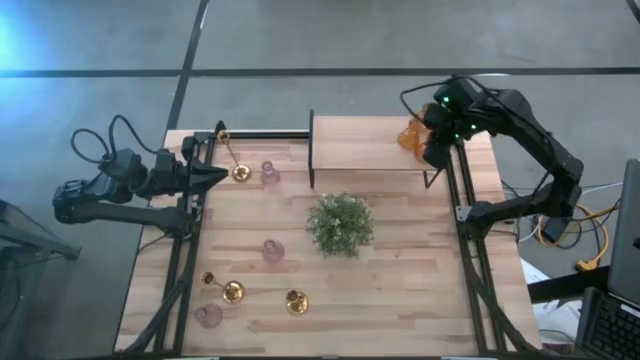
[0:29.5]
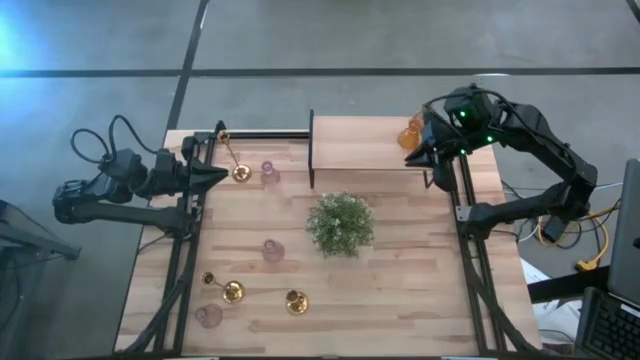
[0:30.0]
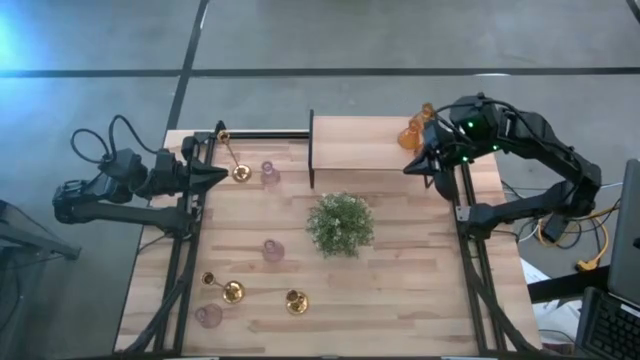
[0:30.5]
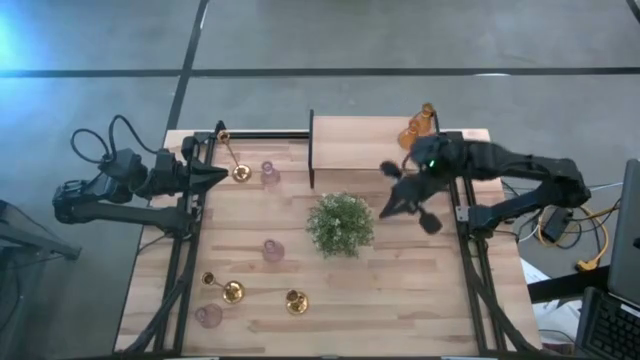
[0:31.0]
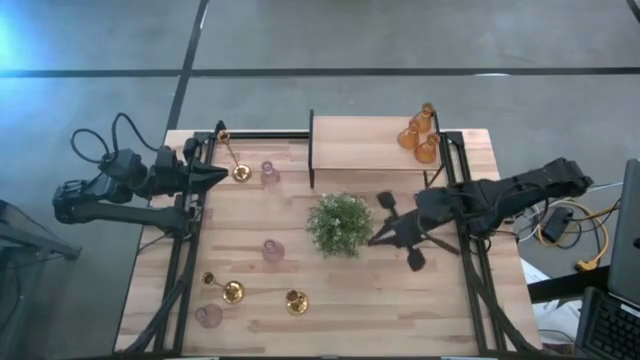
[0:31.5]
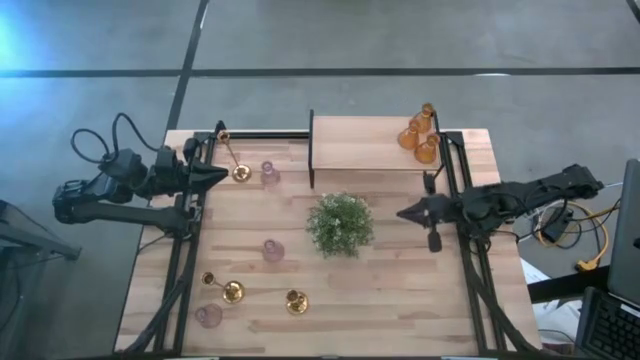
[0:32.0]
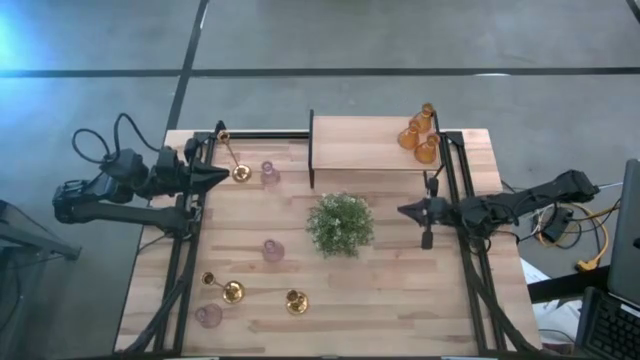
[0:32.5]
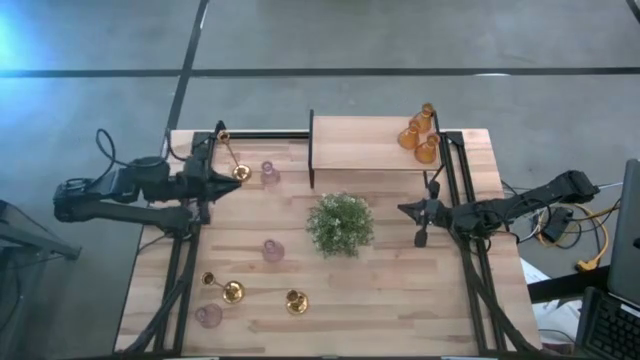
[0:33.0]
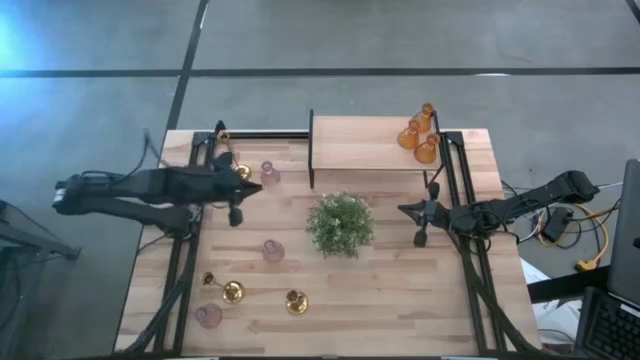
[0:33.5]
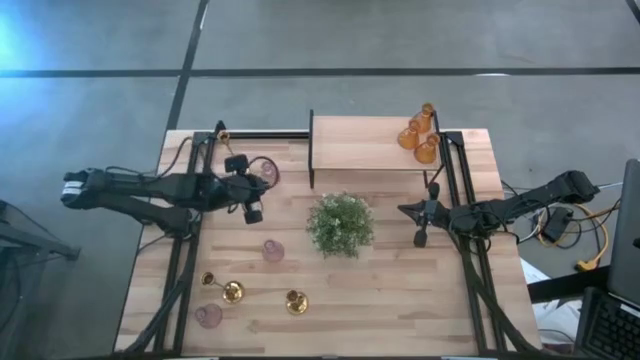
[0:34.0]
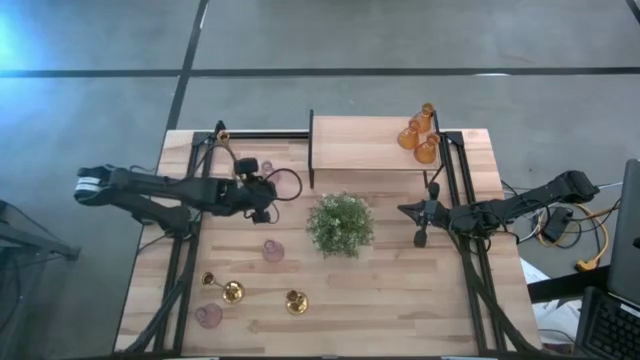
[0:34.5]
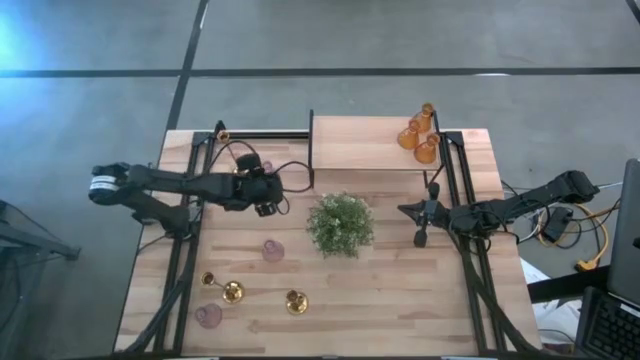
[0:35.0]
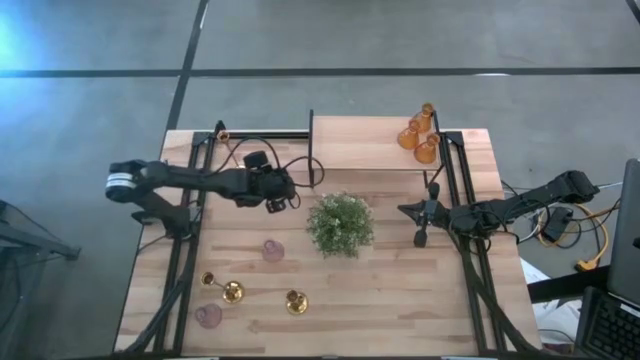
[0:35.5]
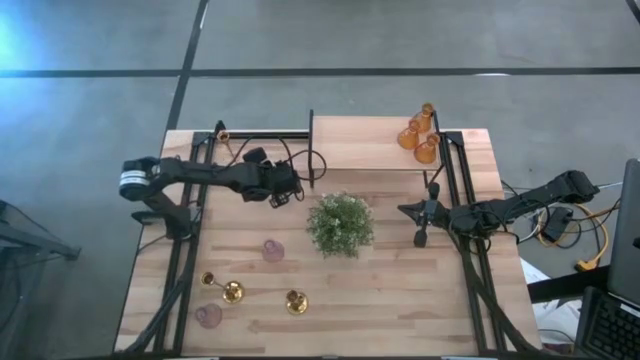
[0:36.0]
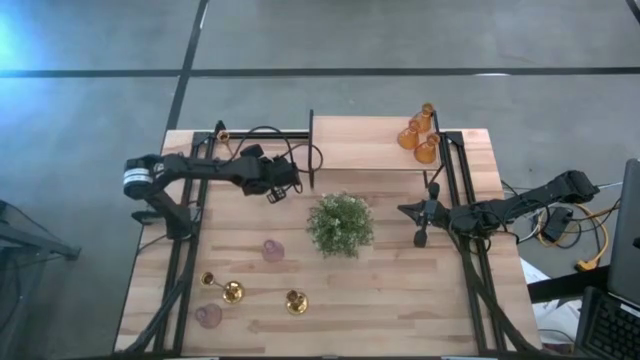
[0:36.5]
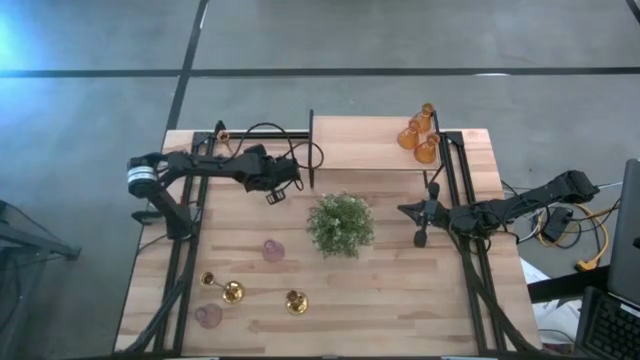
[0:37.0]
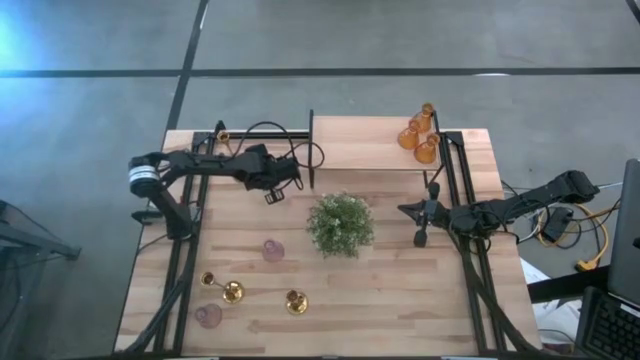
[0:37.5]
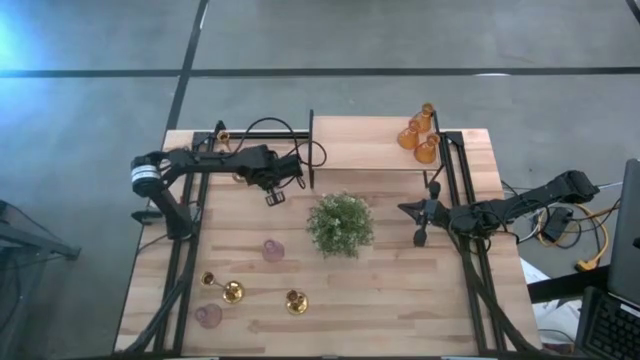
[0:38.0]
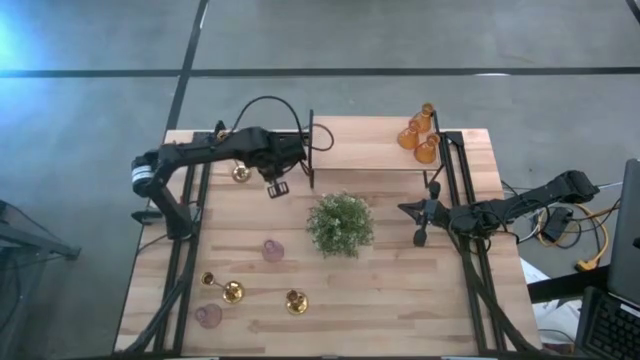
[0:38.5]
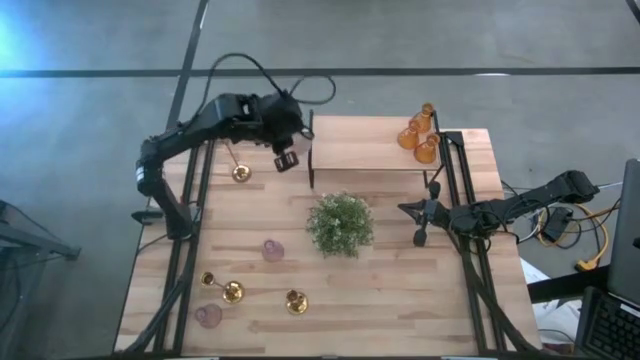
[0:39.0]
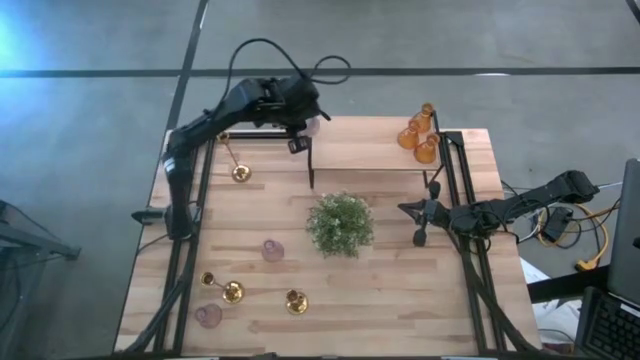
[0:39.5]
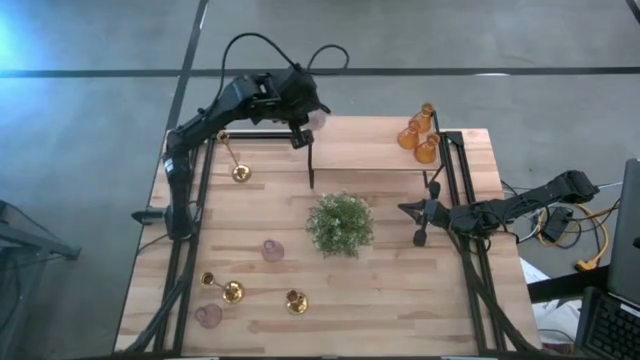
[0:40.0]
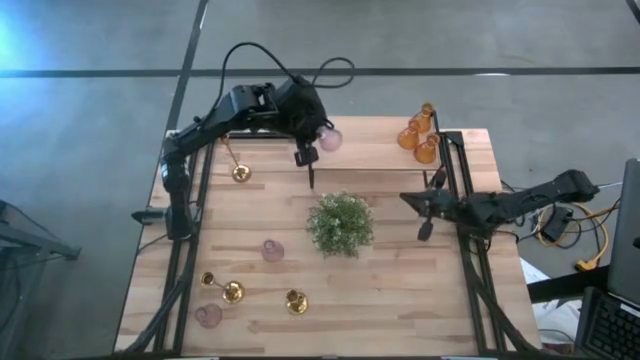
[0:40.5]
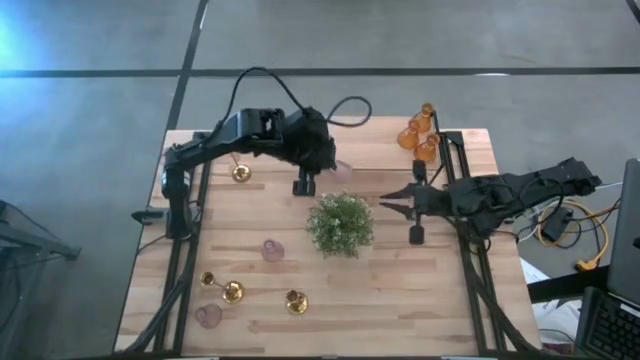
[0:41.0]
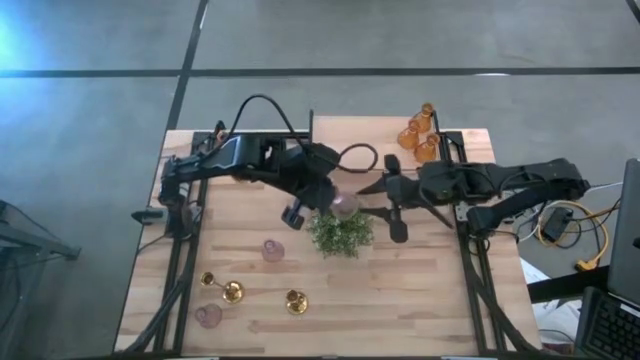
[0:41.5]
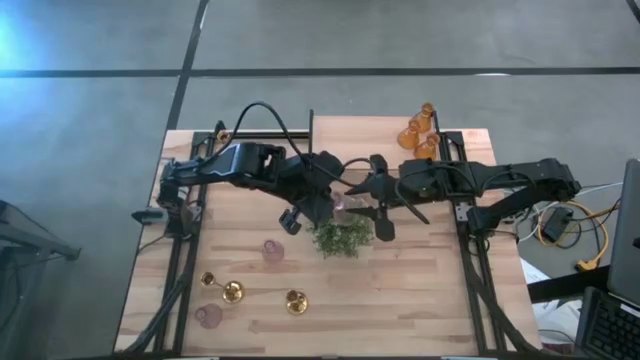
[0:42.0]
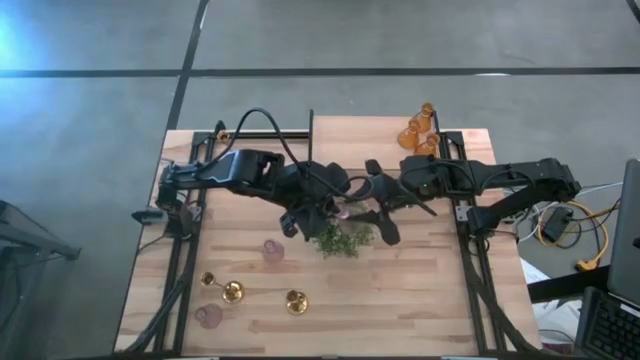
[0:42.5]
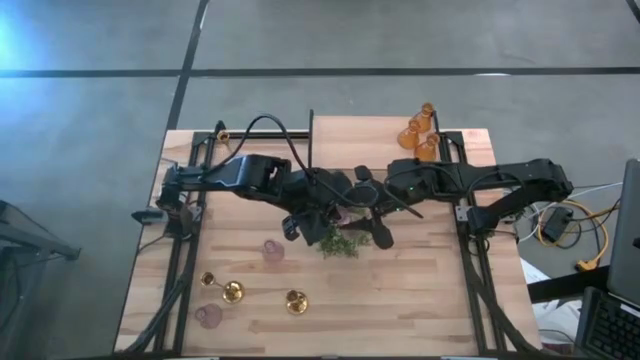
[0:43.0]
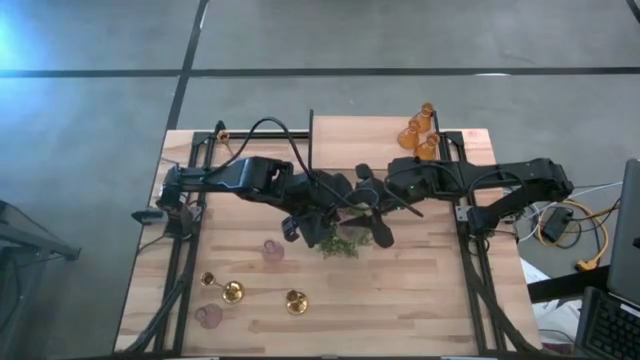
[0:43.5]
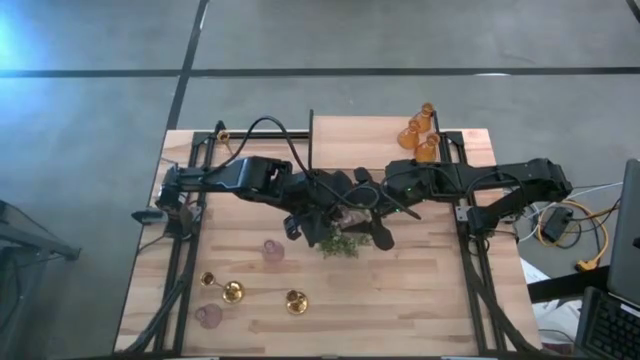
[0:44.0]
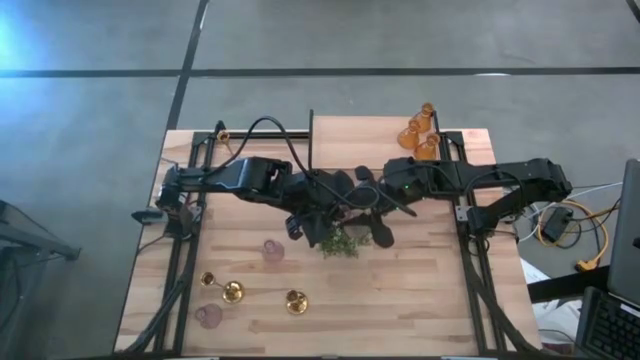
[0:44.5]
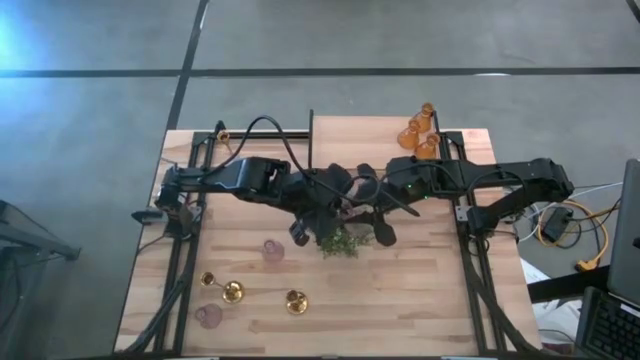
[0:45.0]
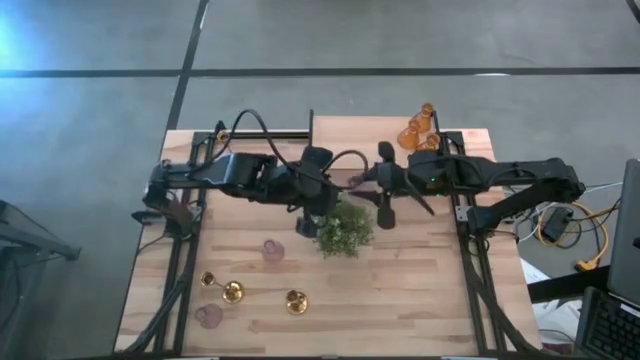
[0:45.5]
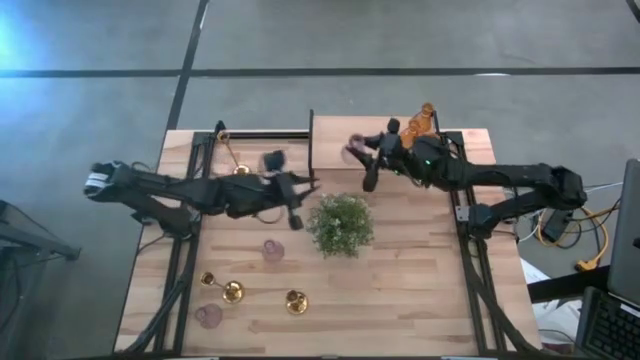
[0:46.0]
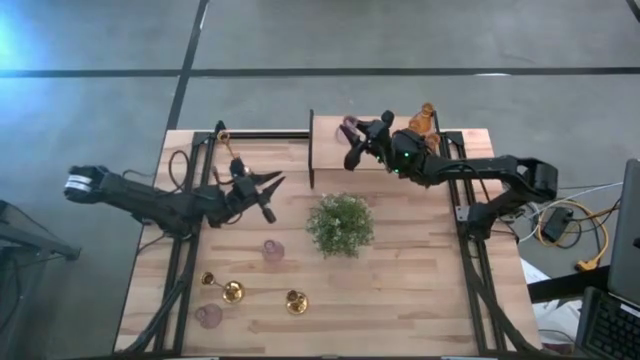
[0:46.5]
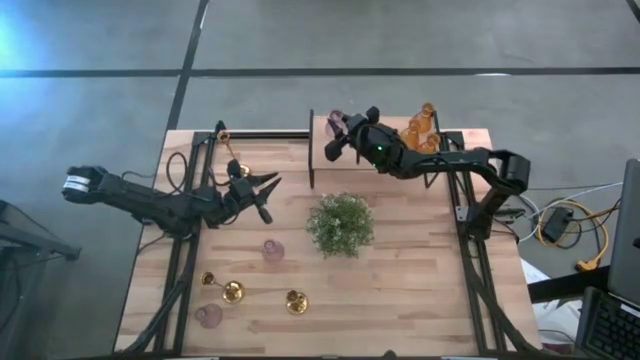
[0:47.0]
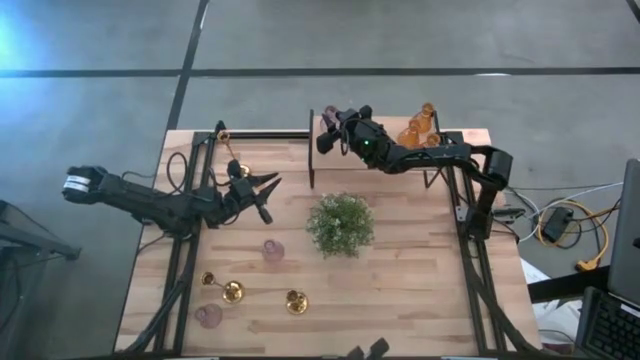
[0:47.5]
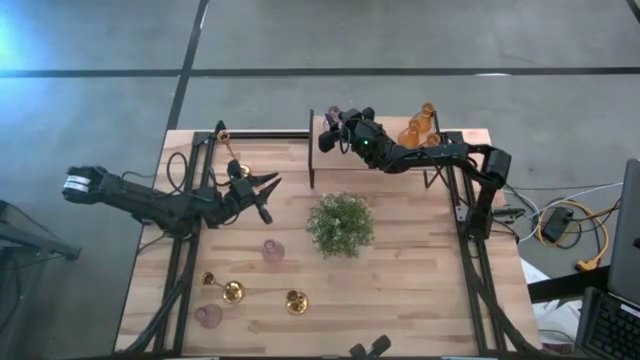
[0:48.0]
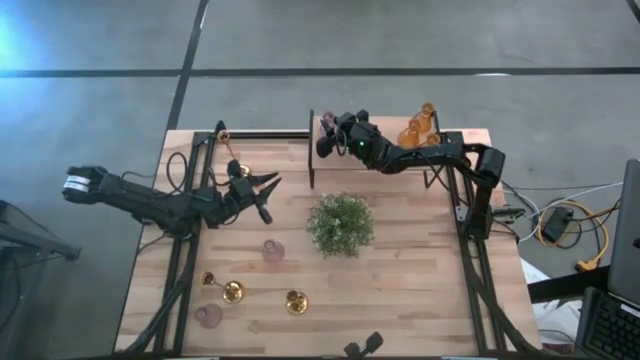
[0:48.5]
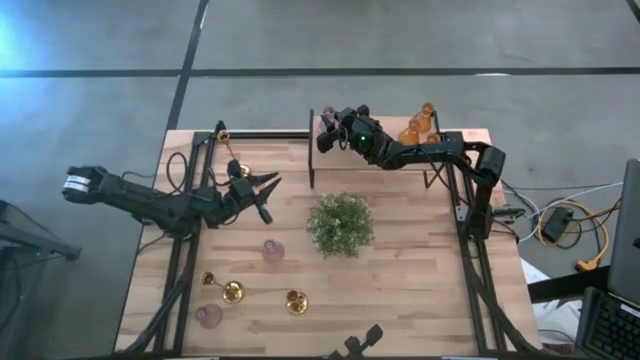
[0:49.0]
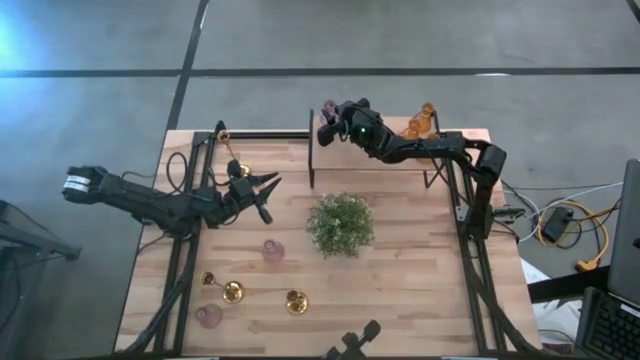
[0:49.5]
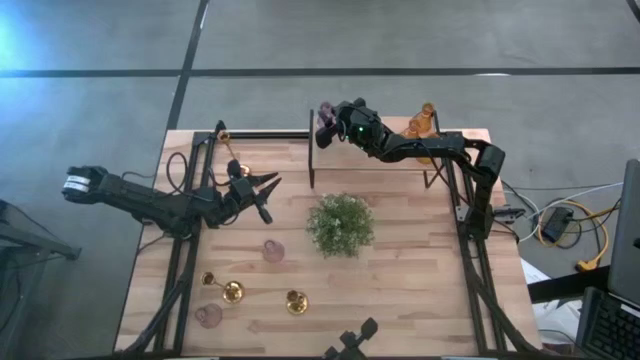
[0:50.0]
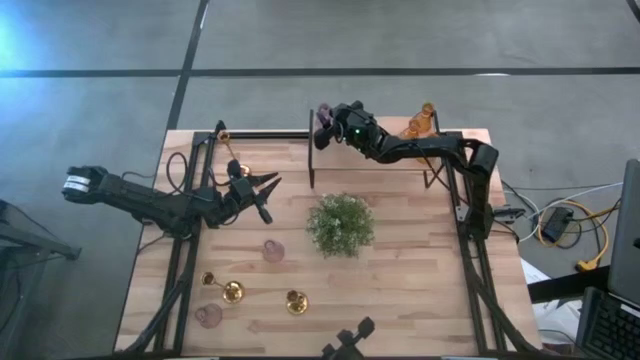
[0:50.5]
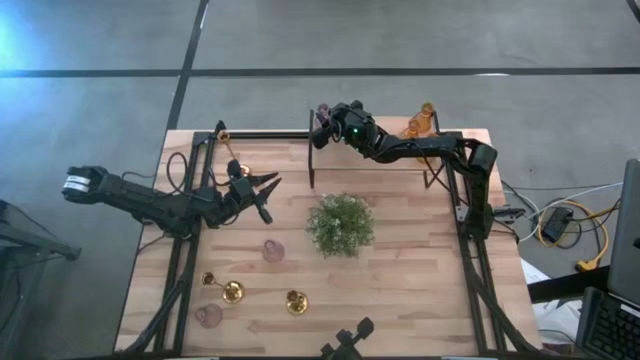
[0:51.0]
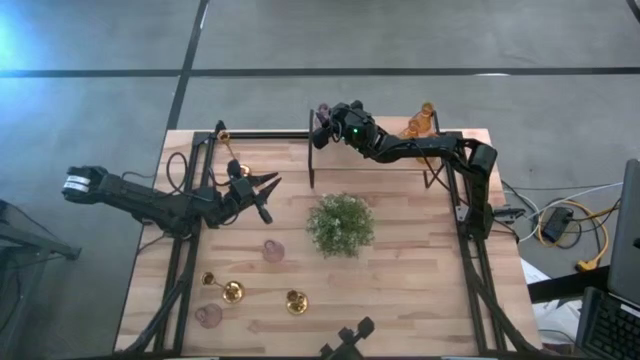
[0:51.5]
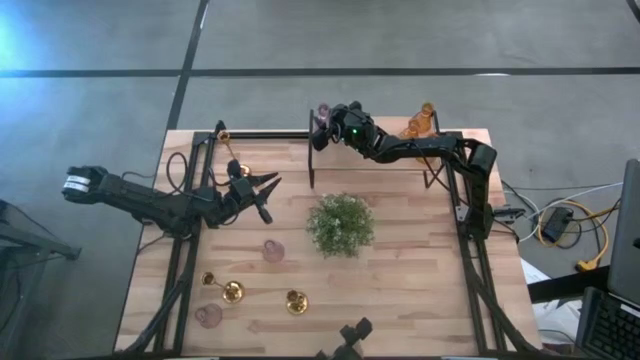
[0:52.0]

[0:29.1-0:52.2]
Task: Pick & Place candle stick holders
Put the top pink candle holder on the shelf
